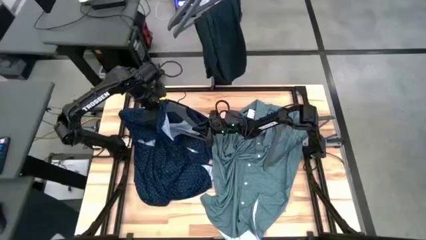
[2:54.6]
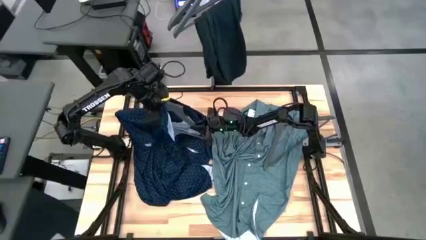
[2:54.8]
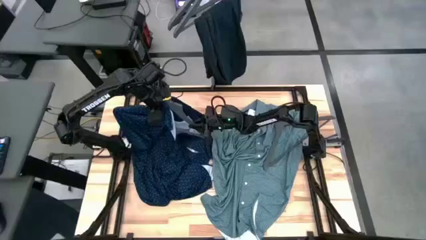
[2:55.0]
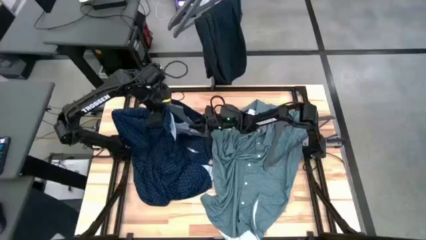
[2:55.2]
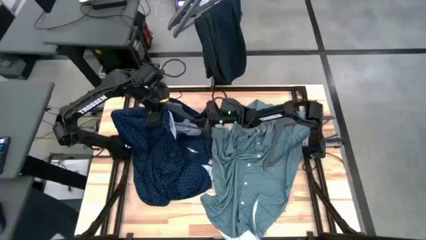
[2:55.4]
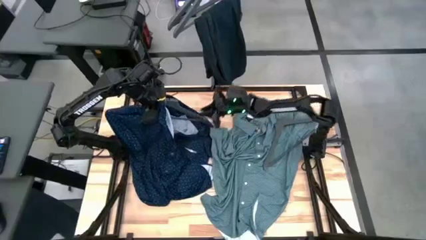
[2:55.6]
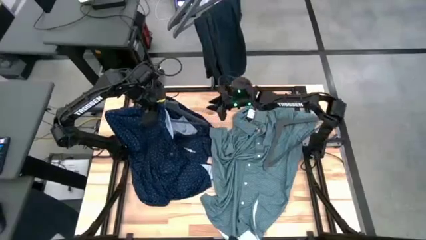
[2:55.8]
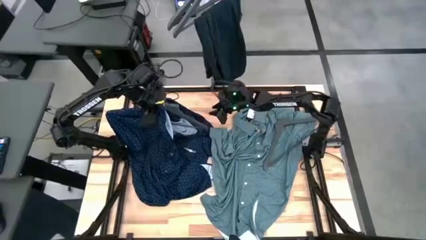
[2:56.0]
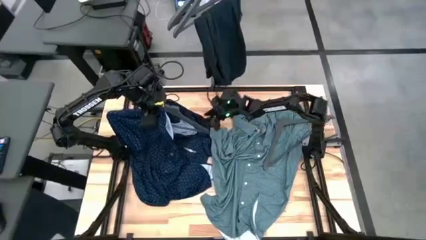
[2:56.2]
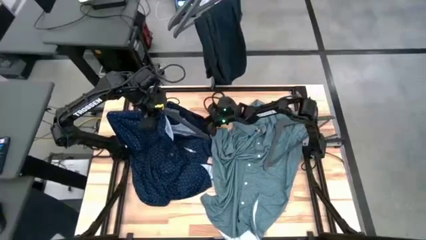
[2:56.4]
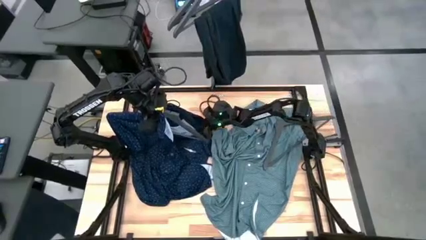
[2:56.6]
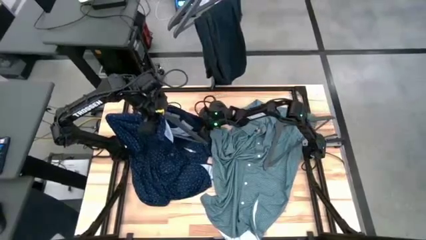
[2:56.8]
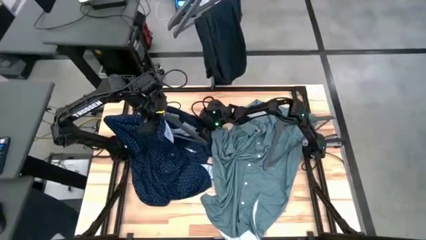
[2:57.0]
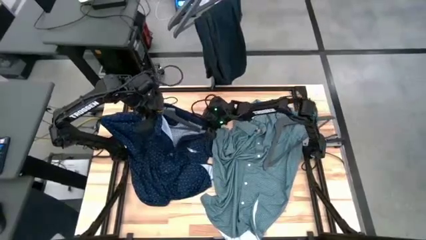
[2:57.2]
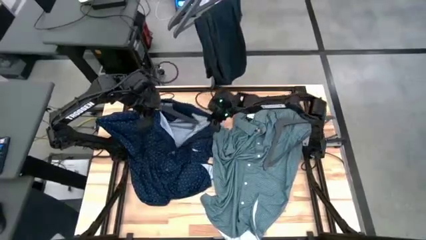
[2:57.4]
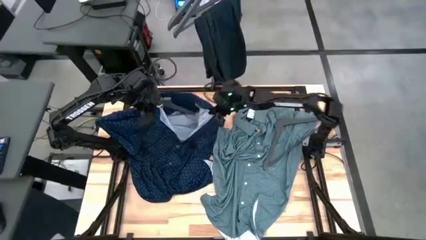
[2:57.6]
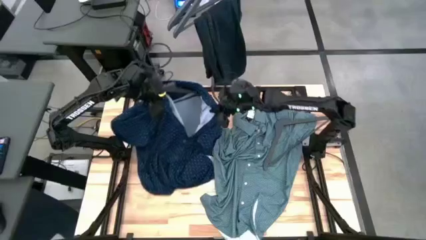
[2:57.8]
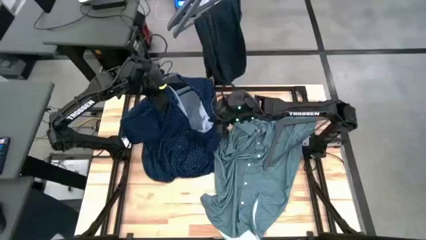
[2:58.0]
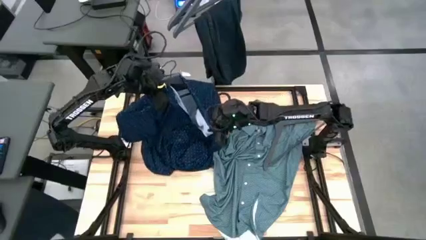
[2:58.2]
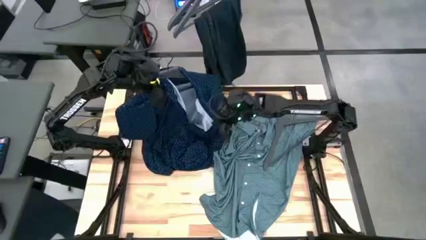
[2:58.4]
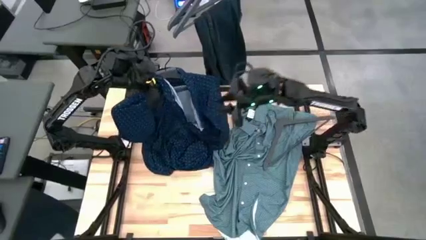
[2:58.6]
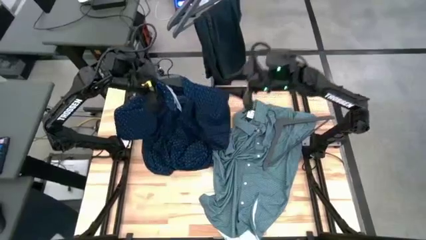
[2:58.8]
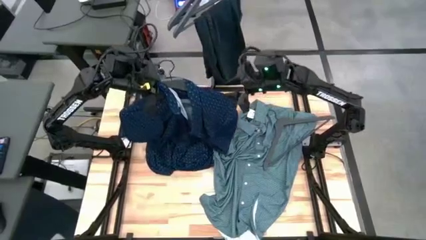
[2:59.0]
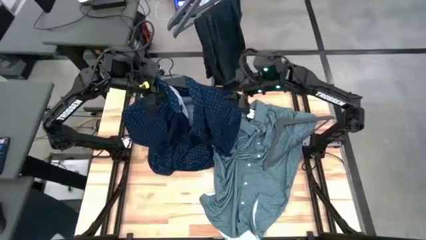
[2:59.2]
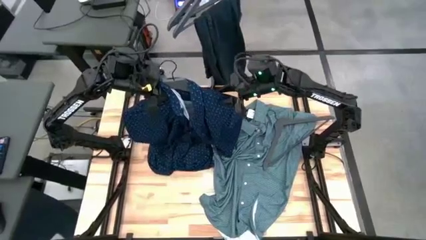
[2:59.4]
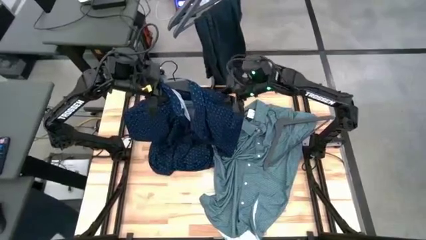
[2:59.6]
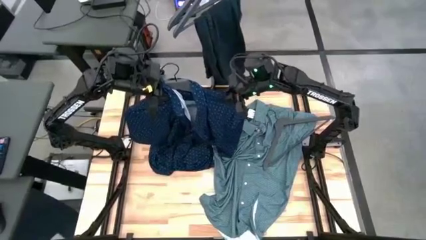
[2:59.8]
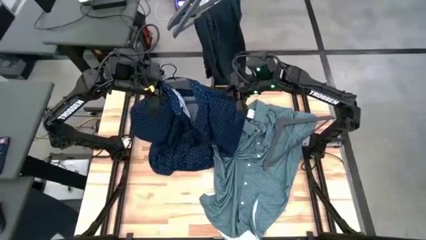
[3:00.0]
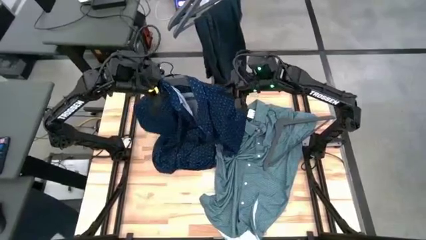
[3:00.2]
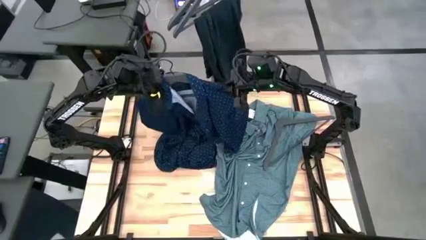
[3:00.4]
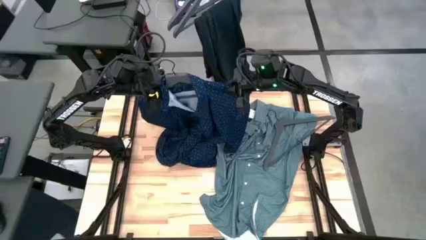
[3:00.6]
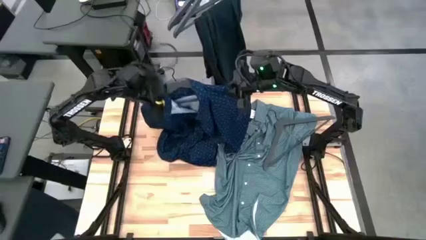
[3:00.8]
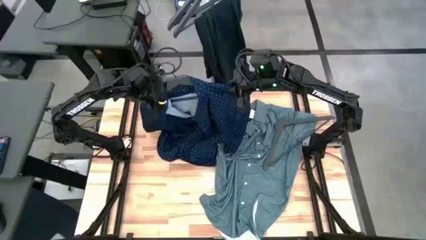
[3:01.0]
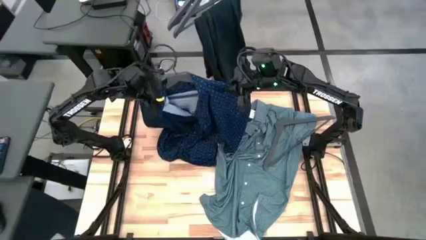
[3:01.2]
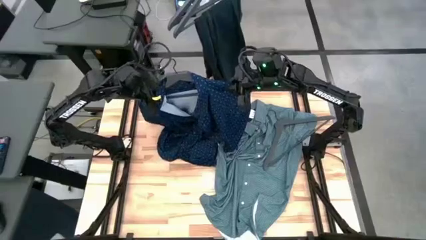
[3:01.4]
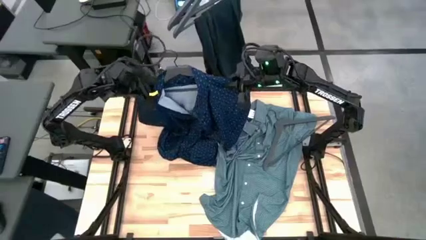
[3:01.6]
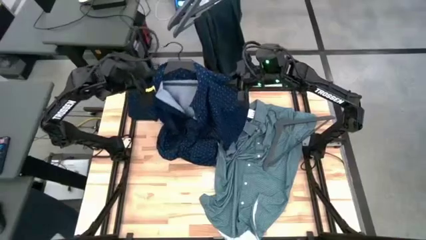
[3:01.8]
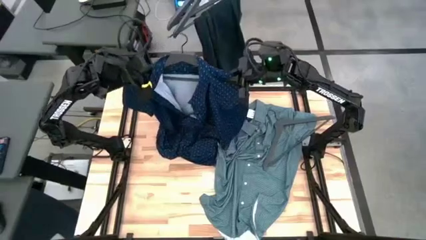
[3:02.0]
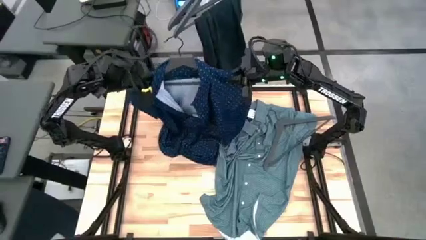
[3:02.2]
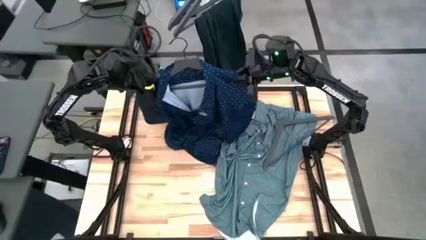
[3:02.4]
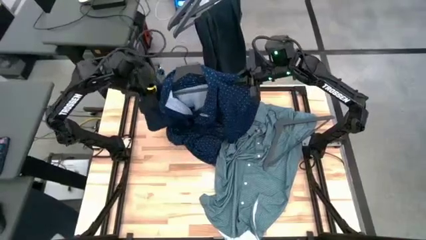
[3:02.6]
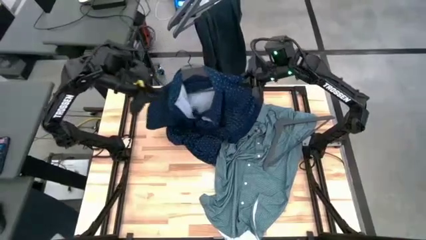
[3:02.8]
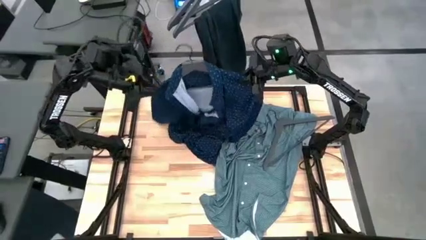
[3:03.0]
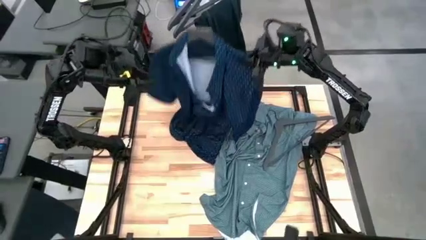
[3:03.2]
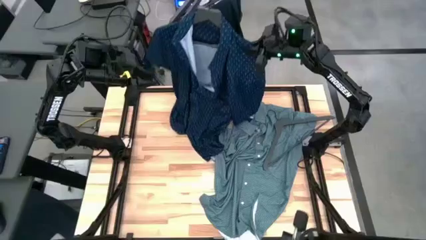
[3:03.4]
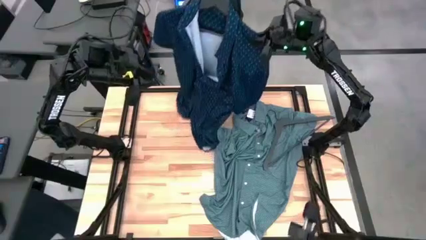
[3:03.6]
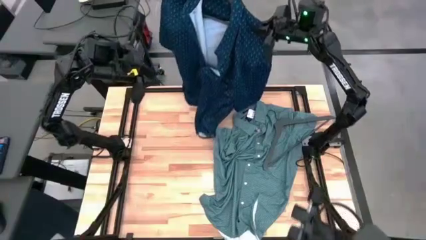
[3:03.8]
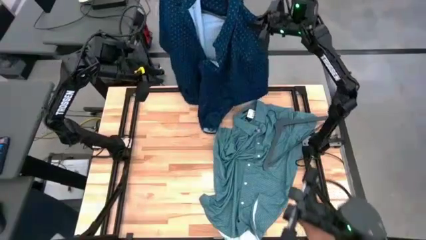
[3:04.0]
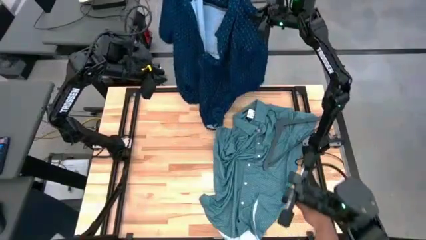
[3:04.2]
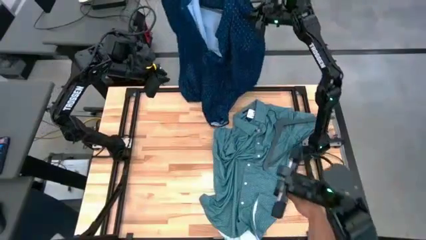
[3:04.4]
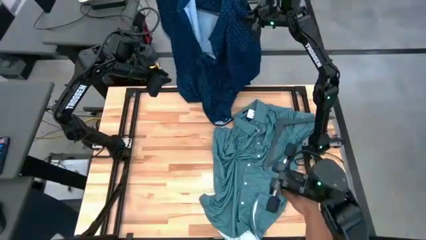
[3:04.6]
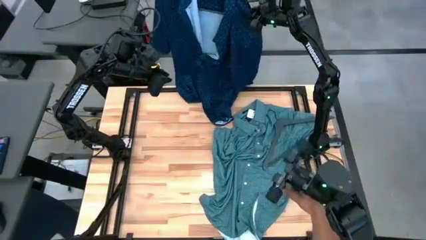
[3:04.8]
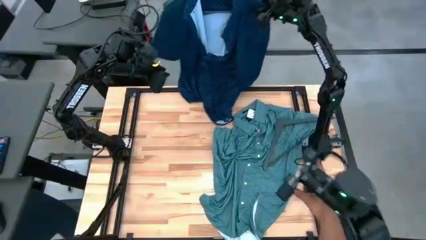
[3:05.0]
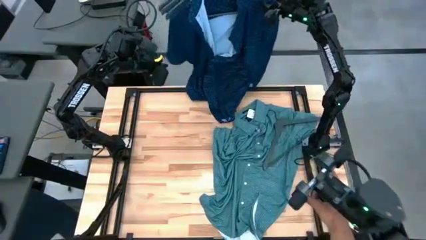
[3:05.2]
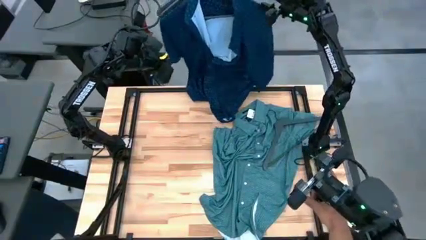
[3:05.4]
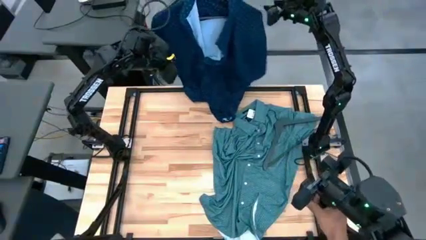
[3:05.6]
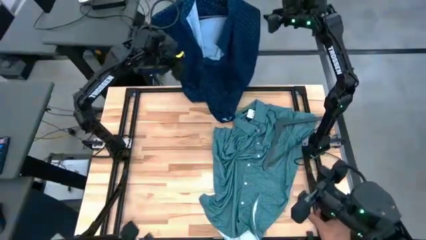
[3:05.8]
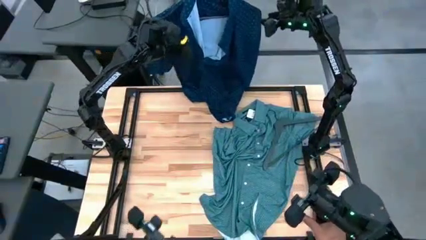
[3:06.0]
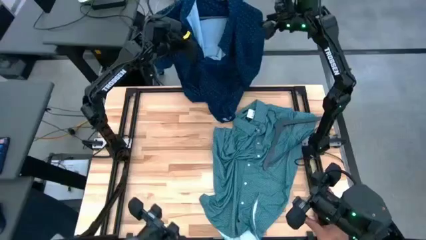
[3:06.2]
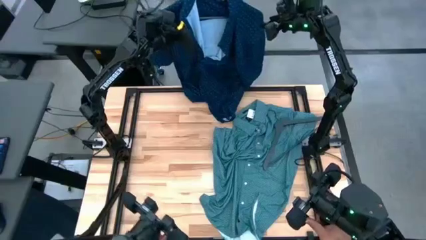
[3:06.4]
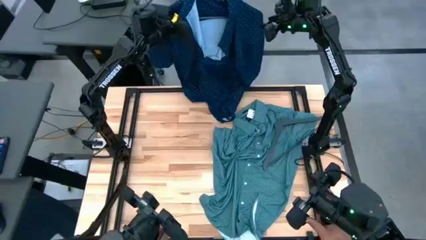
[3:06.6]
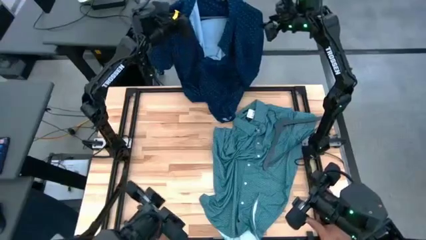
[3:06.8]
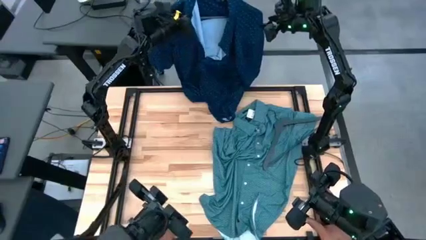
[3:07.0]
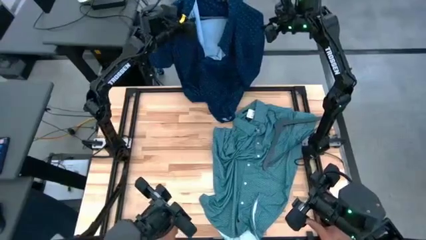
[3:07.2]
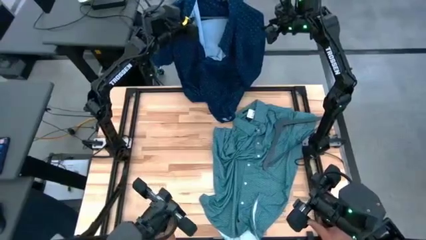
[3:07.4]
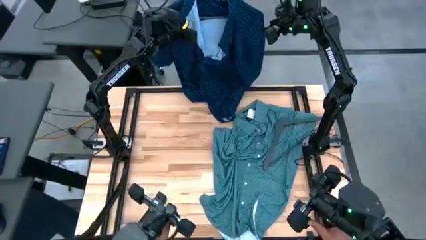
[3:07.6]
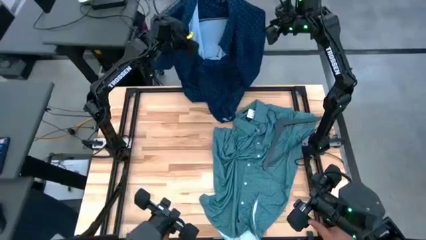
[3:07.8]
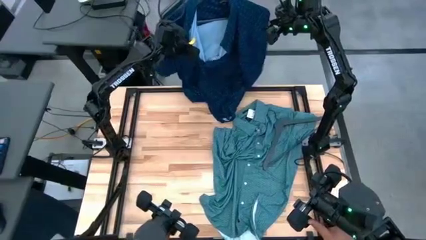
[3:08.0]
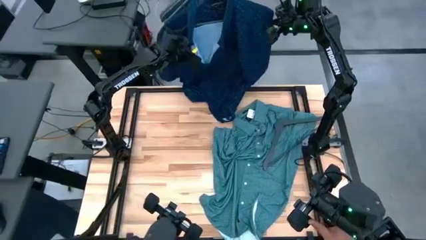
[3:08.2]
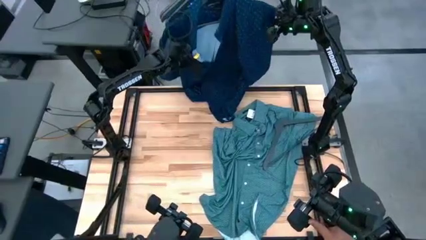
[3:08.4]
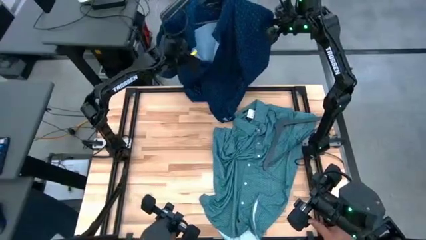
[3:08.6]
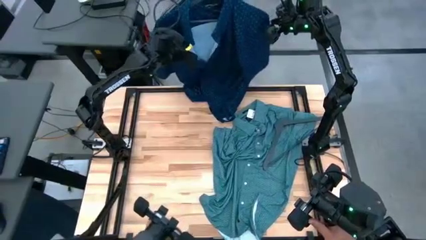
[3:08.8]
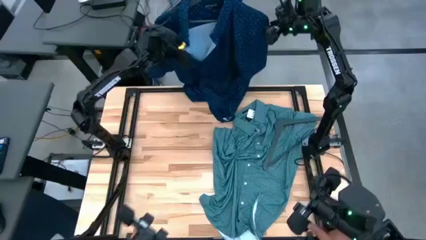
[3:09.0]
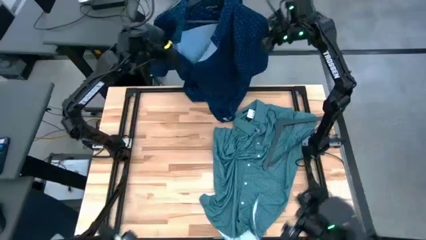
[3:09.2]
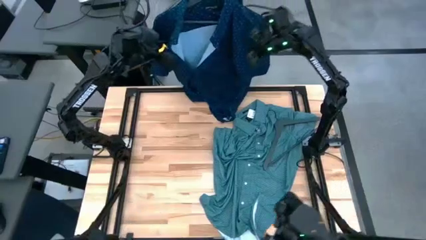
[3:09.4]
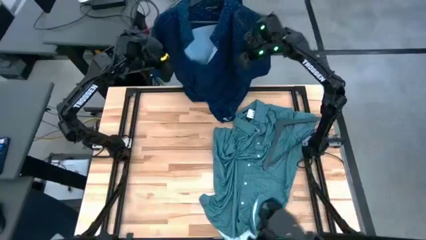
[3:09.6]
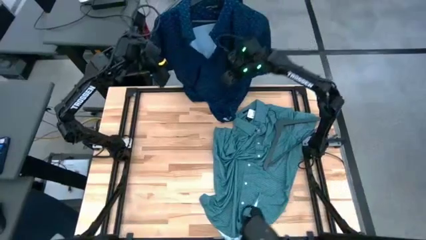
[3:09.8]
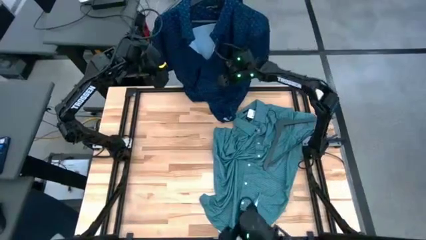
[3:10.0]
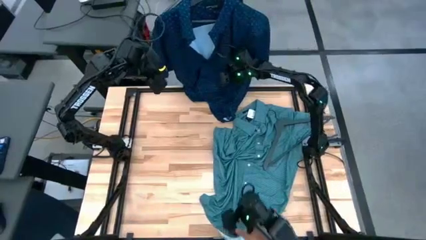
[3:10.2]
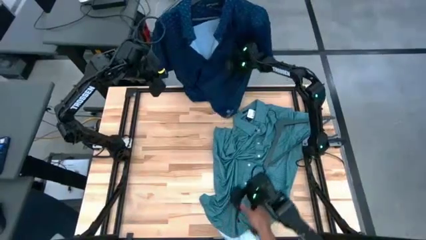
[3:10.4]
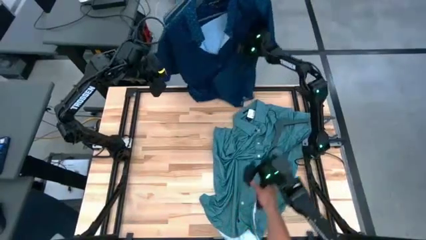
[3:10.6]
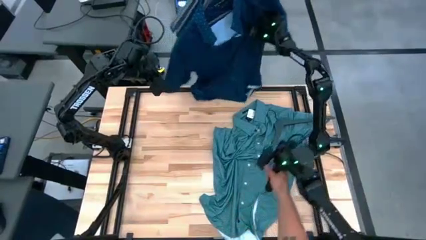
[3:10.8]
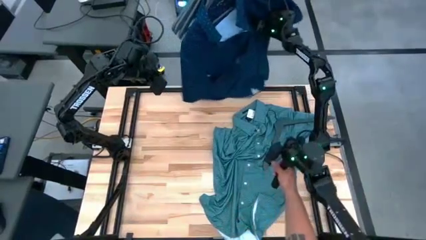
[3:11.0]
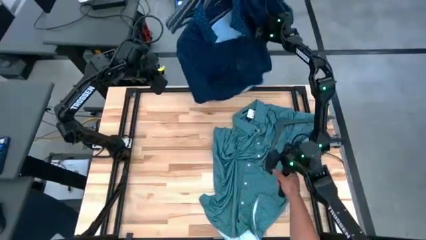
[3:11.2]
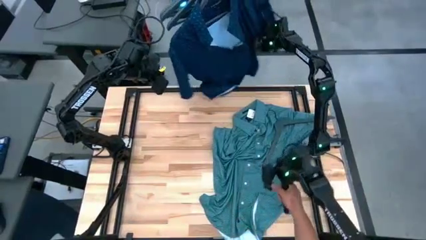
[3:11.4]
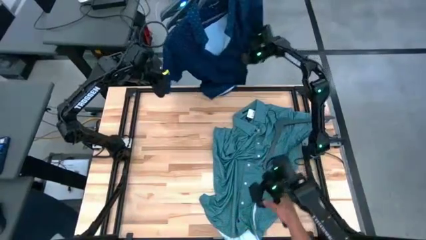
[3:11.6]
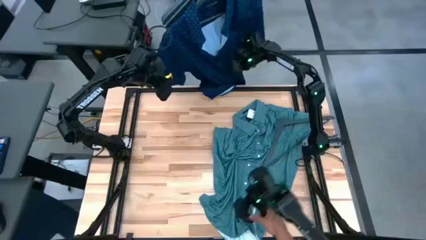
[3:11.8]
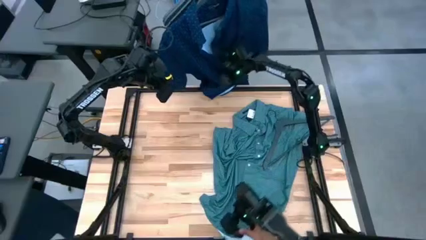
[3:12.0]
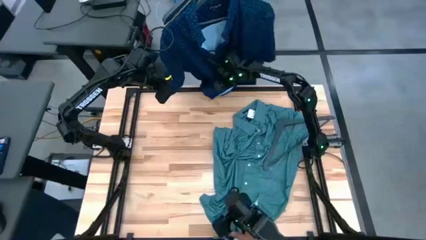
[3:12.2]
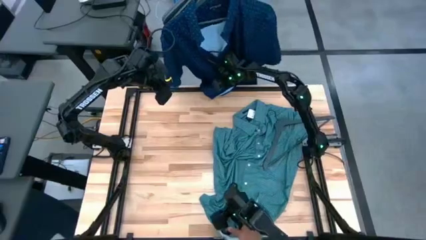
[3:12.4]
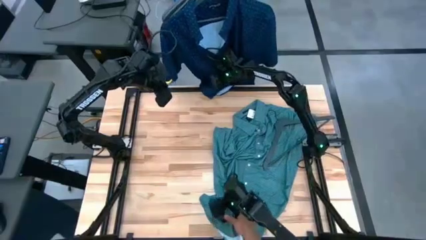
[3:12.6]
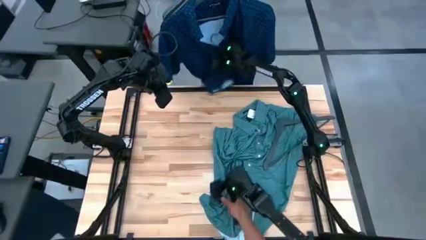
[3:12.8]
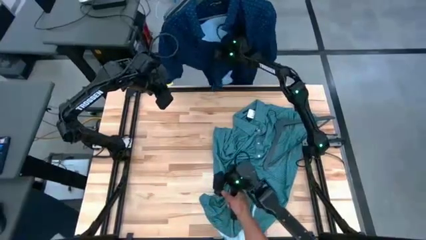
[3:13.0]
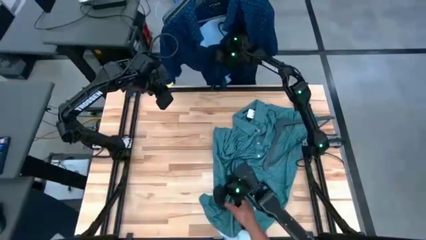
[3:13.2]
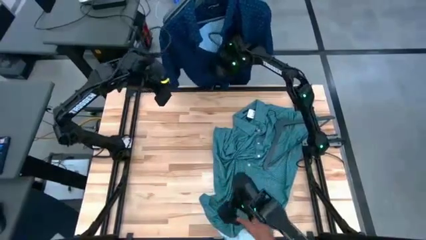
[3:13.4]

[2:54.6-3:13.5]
Task: Hang clothes
Hang the blue polo shirt on the rack
